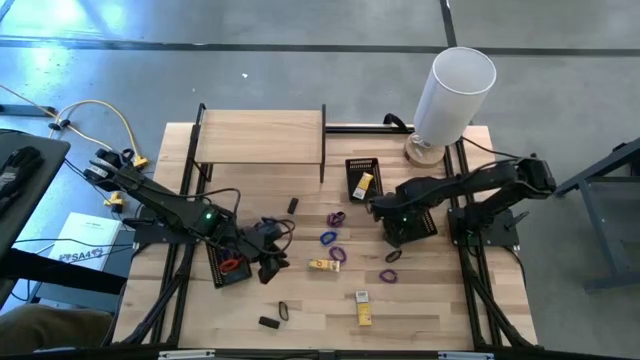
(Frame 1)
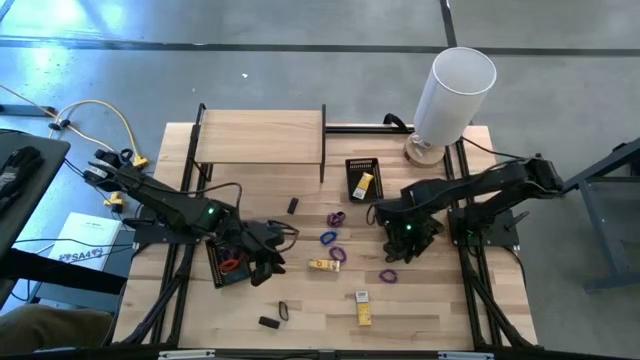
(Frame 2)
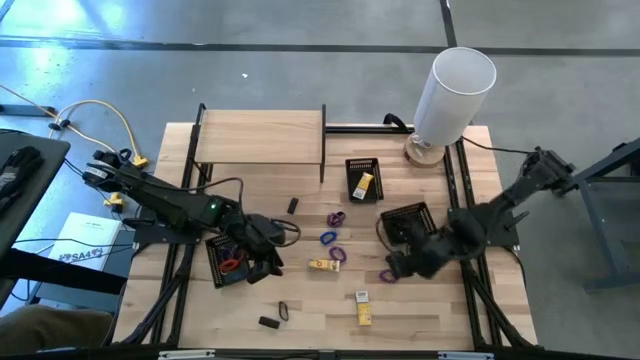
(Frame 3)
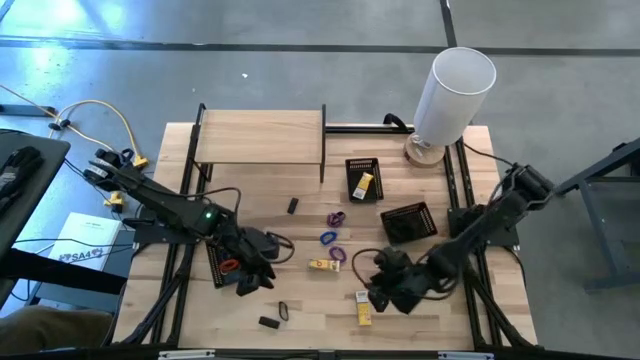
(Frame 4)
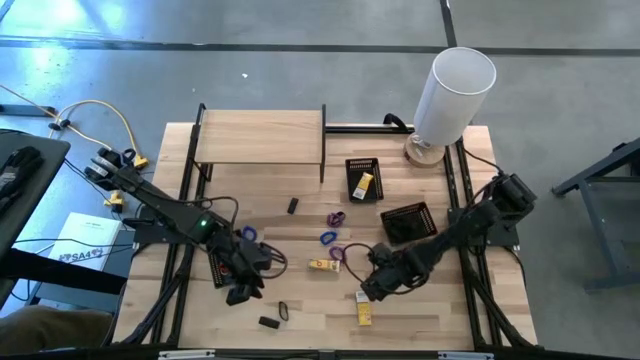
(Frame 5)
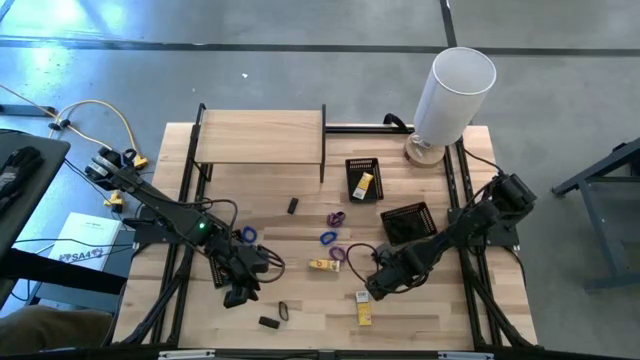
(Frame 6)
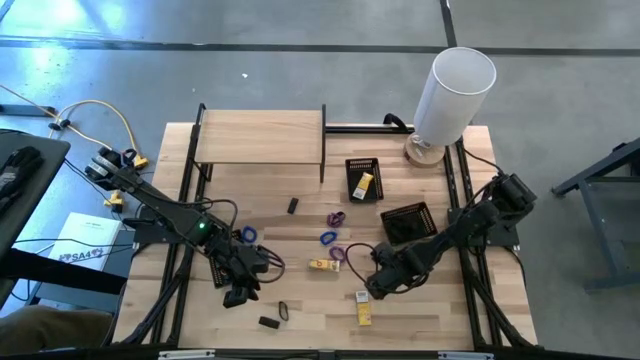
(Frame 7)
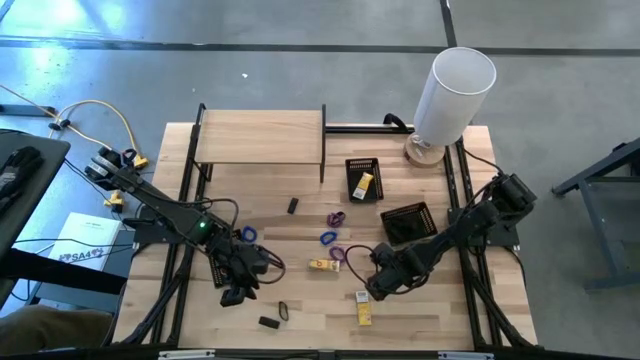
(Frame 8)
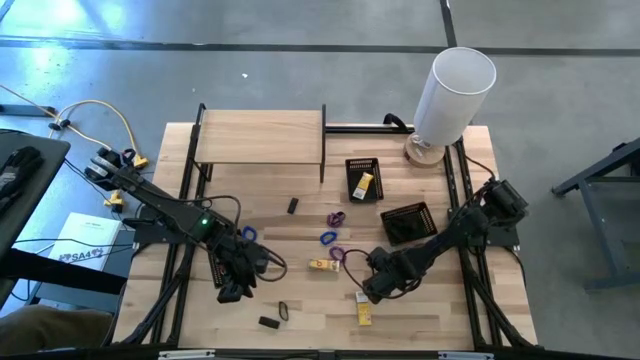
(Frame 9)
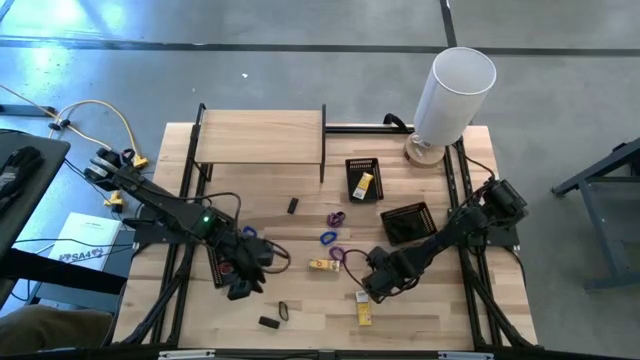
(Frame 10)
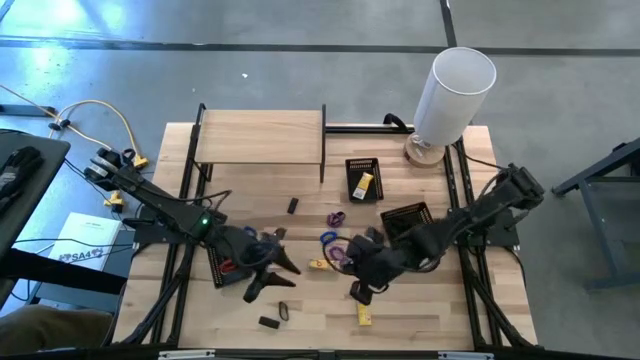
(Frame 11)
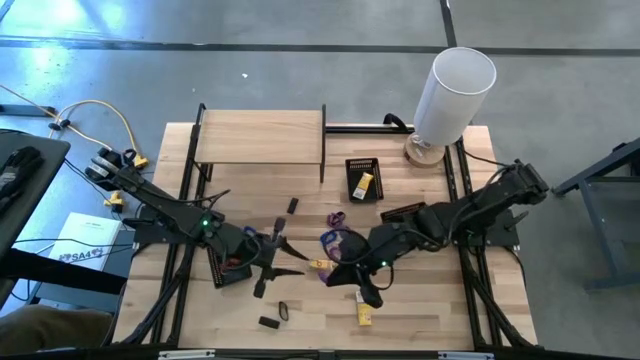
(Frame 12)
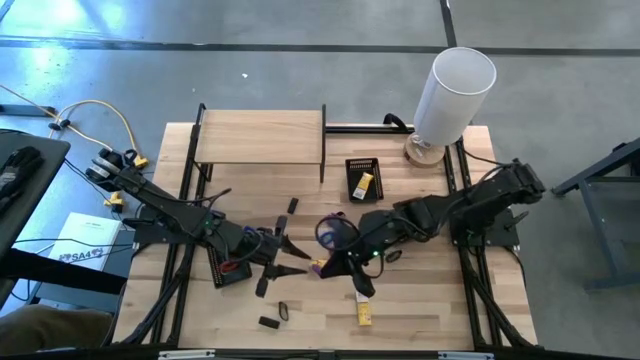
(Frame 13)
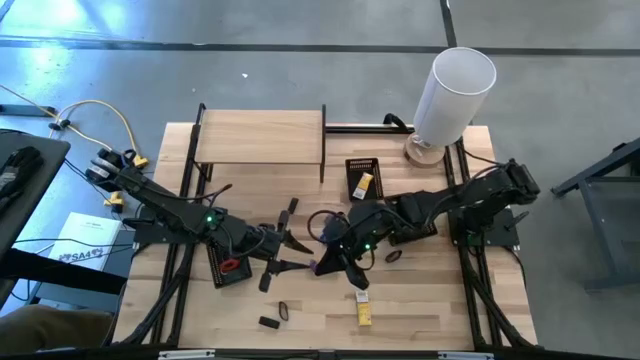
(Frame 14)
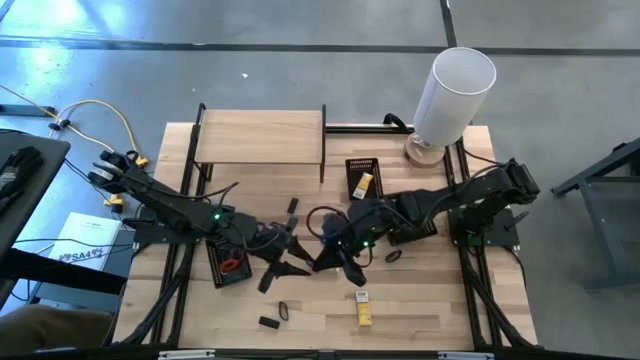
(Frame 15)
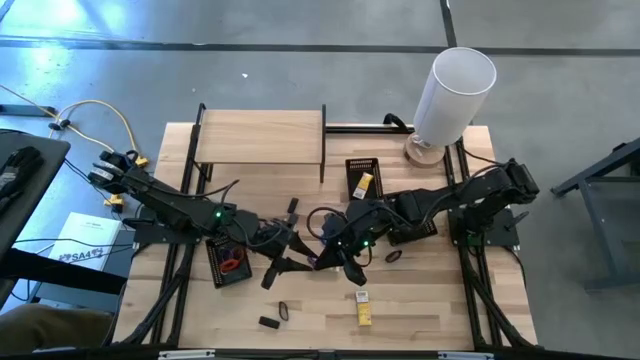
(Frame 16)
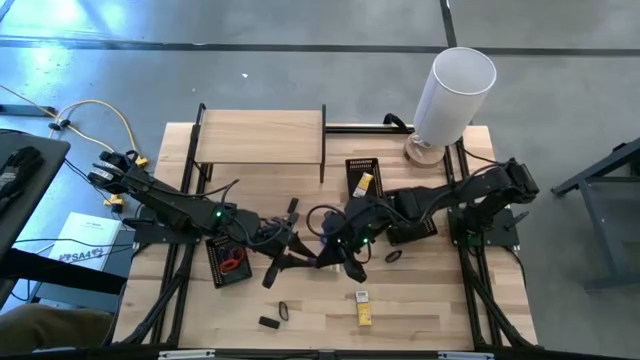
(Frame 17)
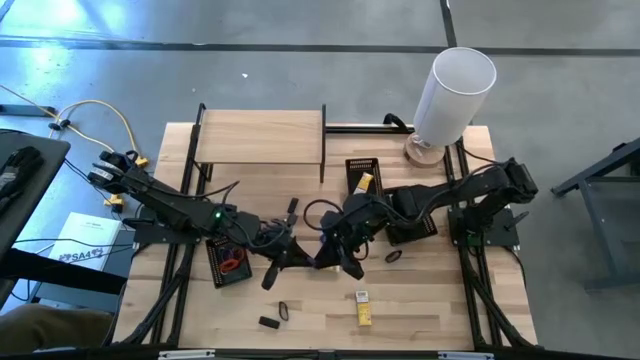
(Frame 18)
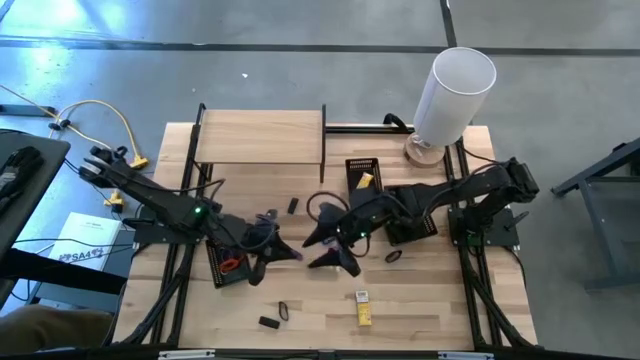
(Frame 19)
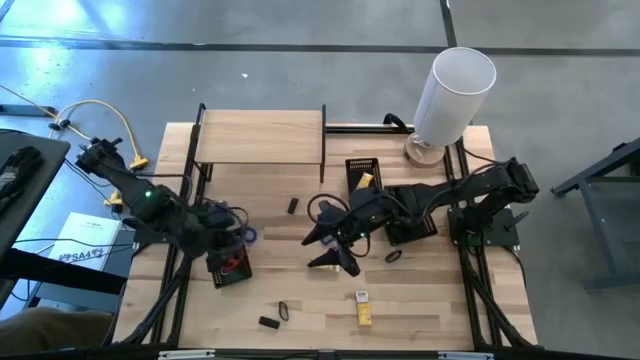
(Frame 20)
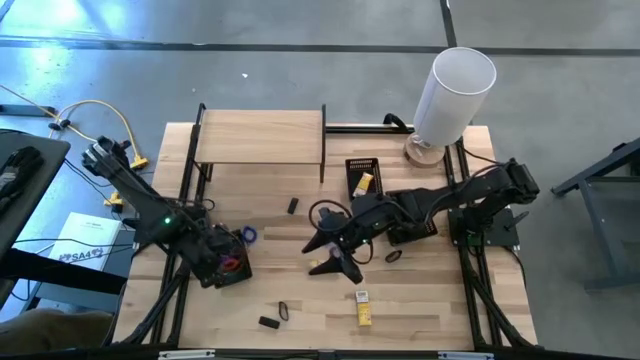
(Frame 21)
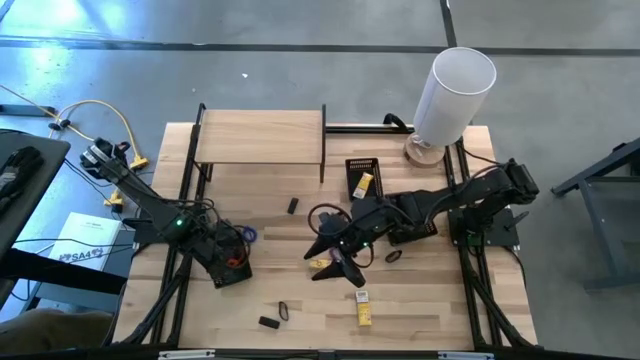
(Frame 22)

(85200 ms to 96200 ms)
Task: Pick & Place Office Desk Supplies
Put the purple spring keychain into the bottom left black bin

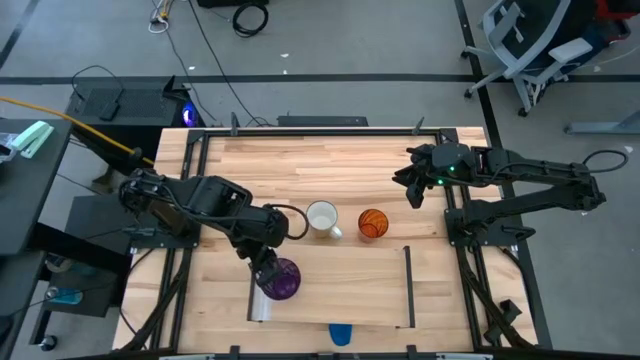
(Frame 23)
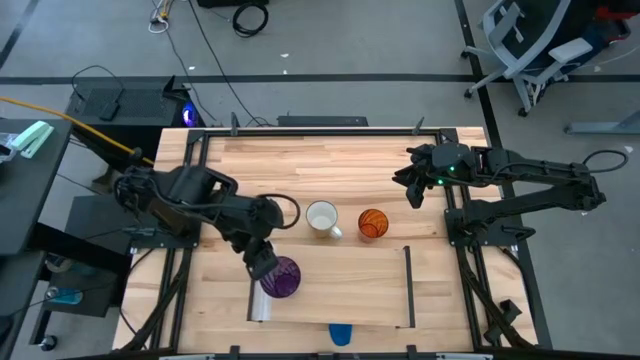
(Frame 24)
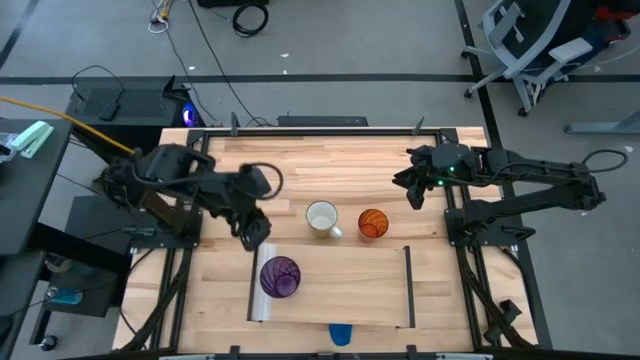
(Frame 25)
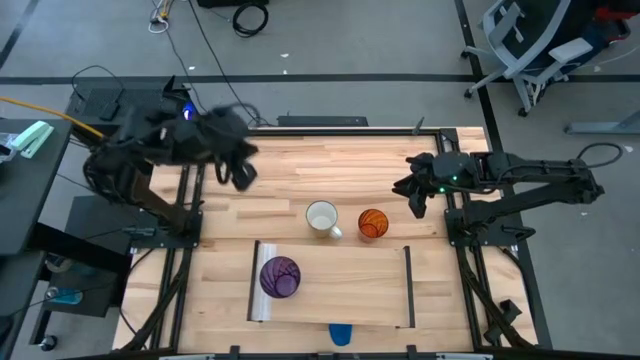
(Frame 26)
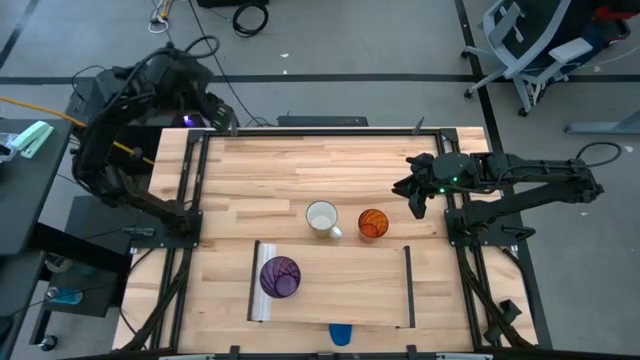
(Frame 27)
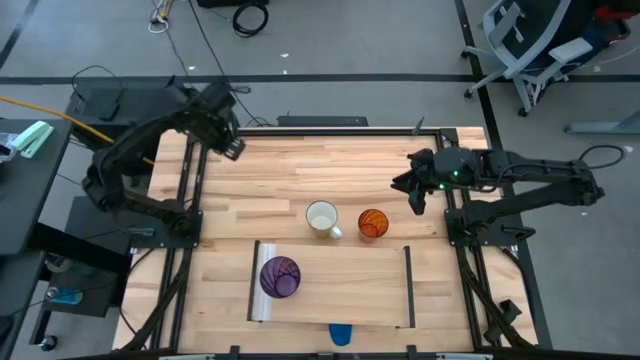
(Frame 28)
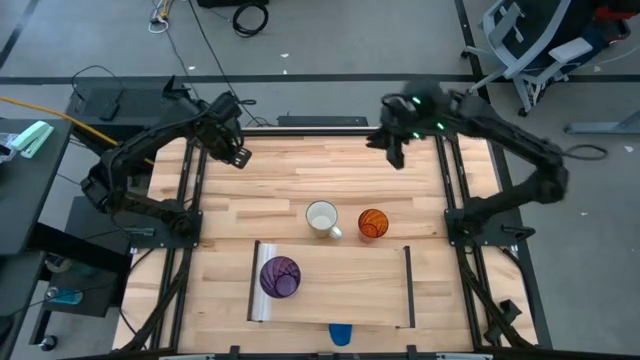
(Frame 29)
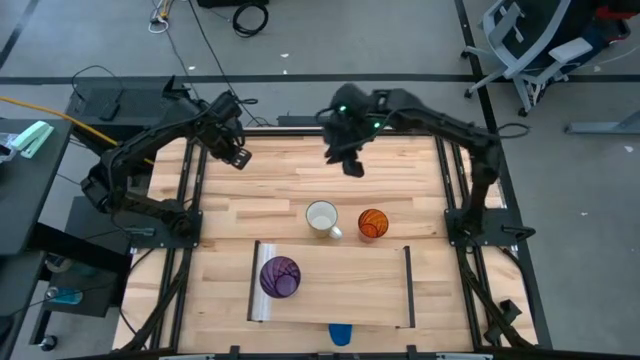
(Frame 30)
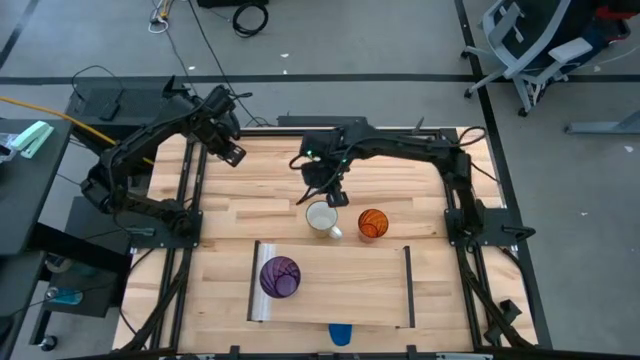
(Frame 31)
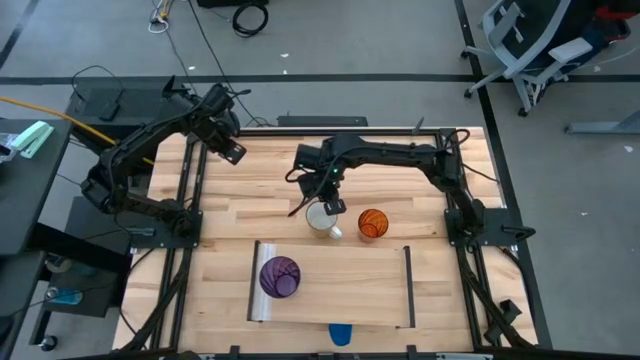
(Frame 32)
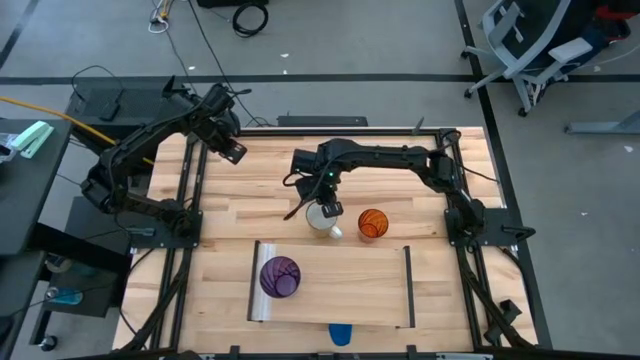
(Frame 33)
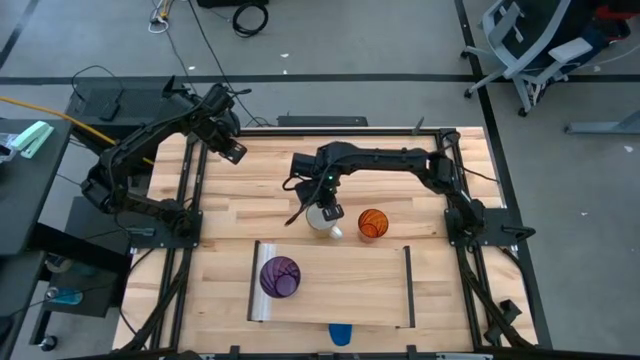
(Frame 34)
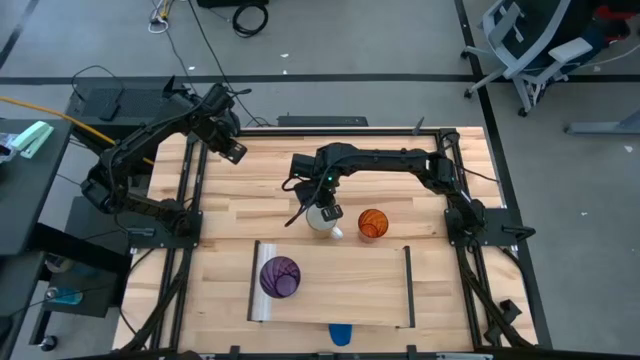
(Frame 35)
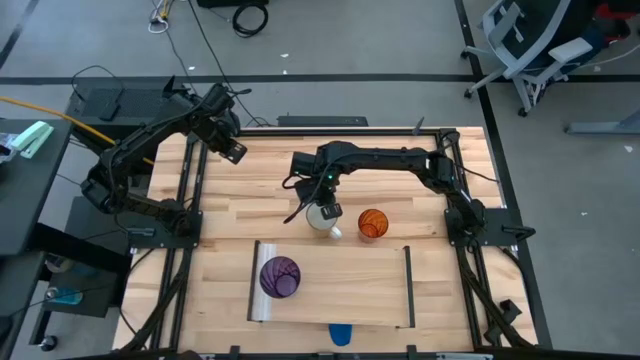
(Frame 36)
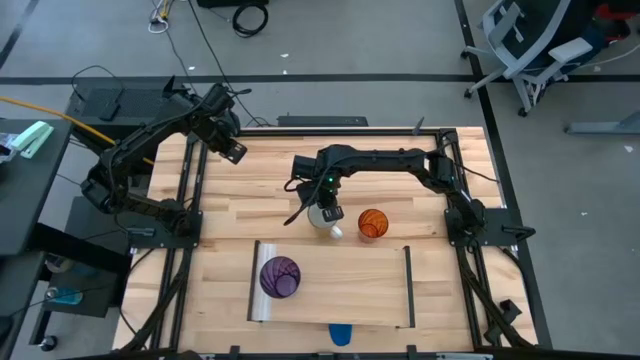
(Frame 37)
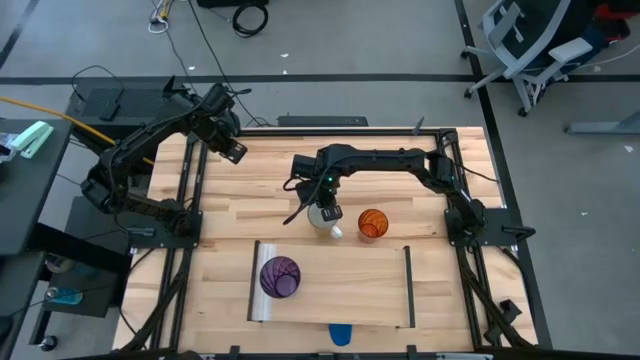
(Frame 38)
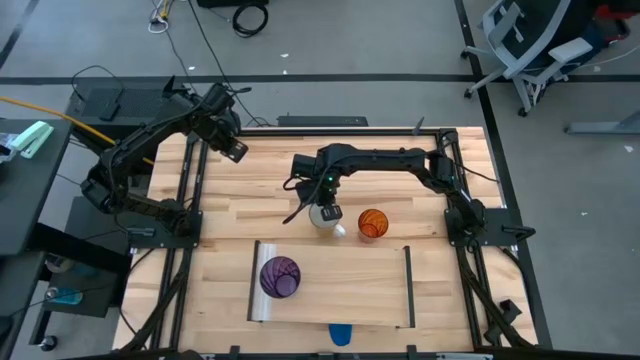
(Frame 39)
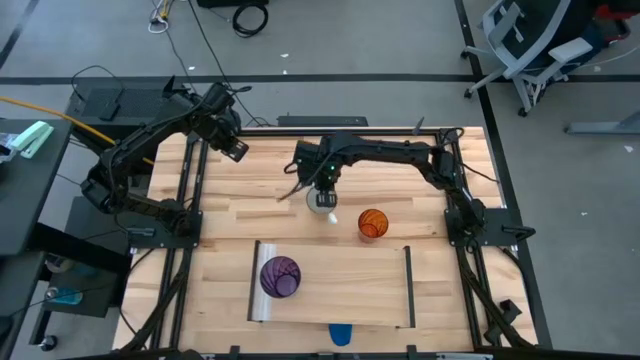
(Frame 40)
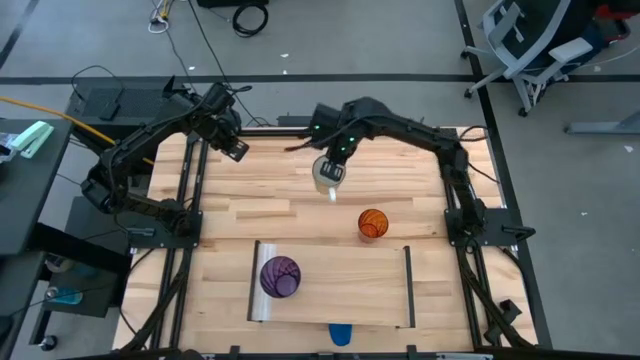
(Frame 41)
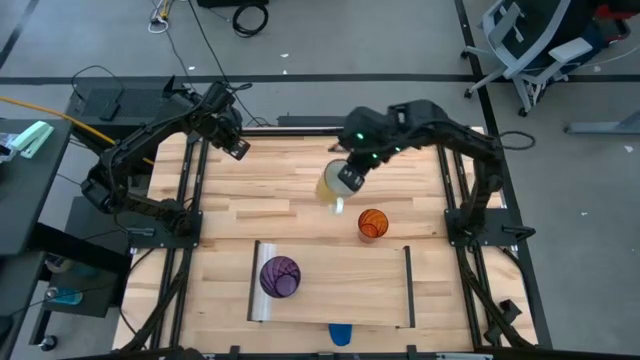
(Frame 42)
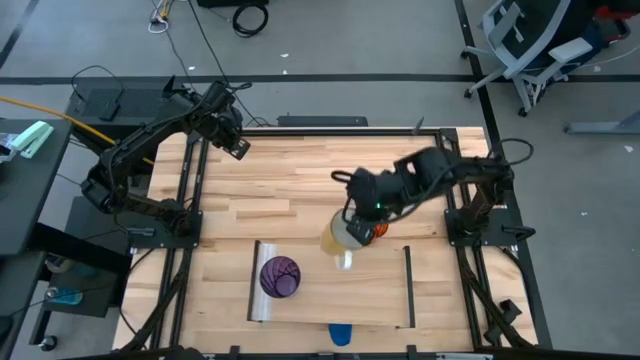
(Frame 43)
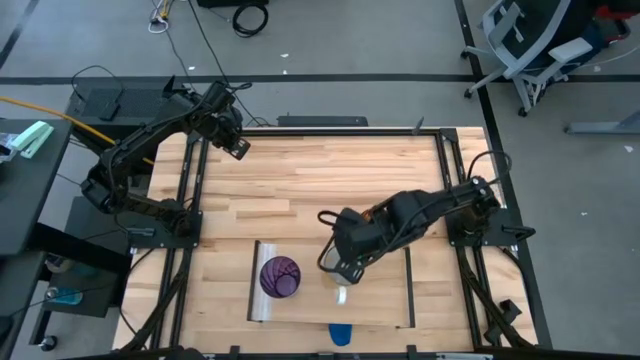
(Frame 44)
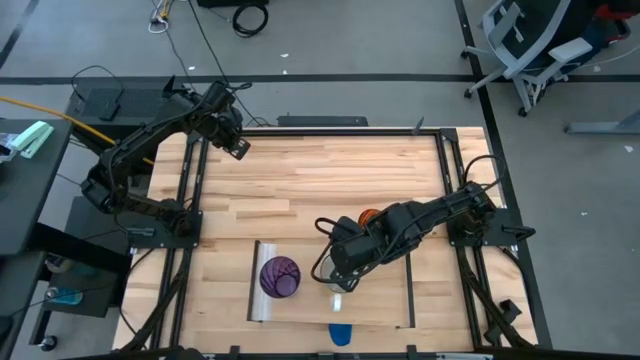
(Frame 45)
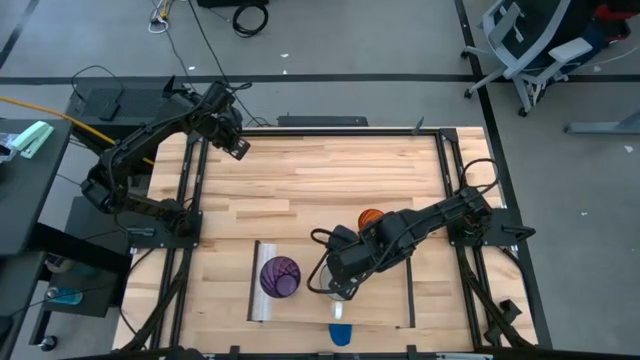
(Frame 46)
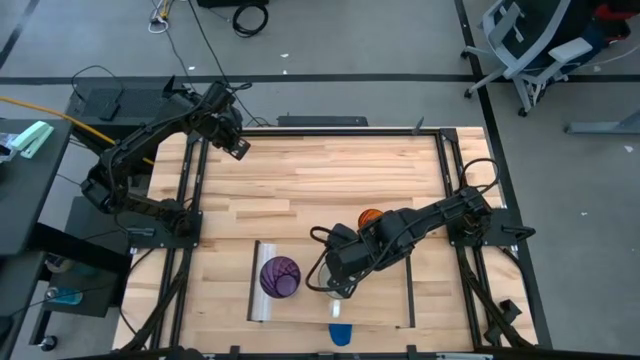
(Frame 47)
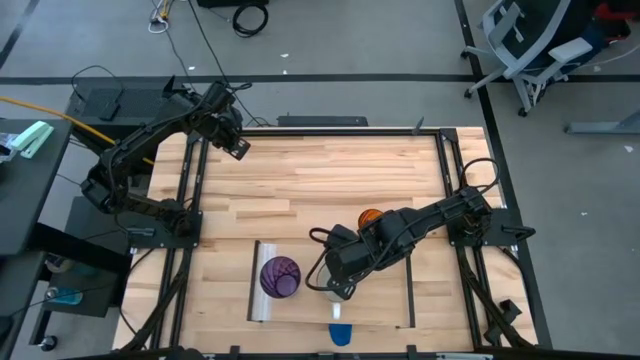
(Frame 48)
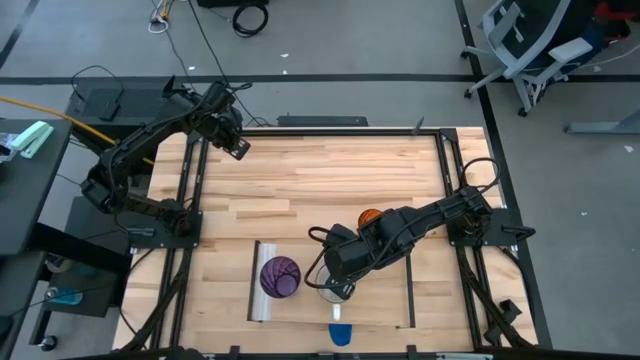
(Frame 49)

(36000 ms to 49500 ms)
Task: Stack small to large cups/mugs on shelf
Put the yellow mug on the shelf
